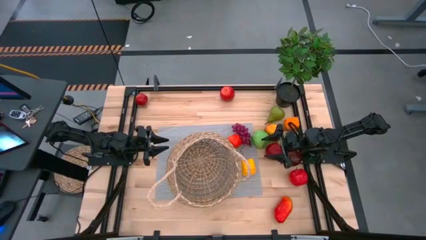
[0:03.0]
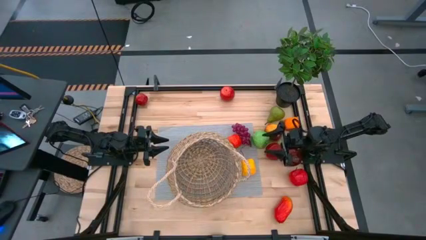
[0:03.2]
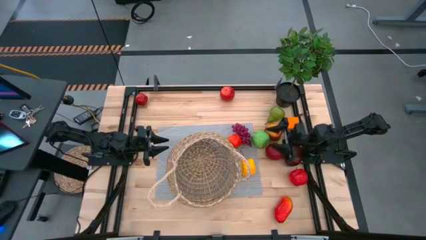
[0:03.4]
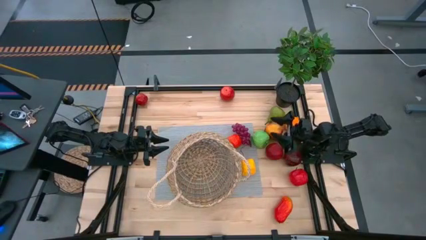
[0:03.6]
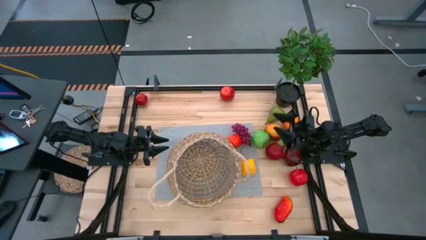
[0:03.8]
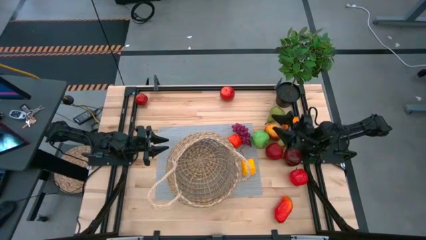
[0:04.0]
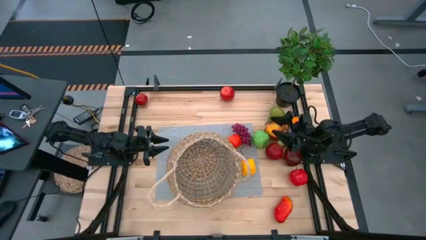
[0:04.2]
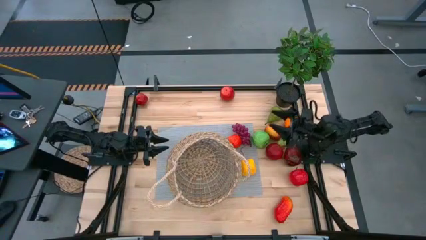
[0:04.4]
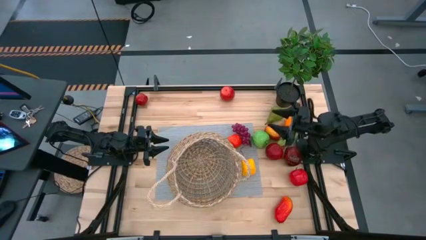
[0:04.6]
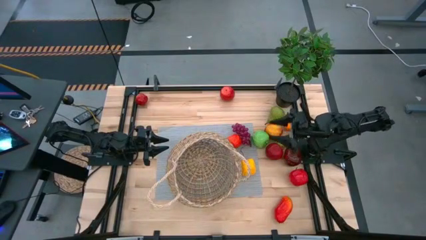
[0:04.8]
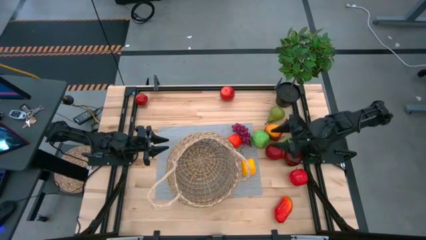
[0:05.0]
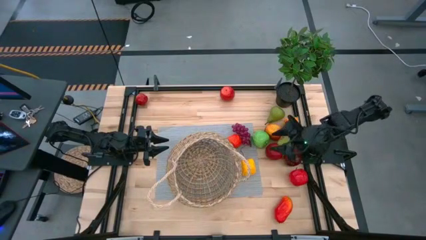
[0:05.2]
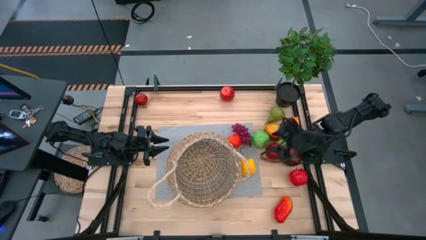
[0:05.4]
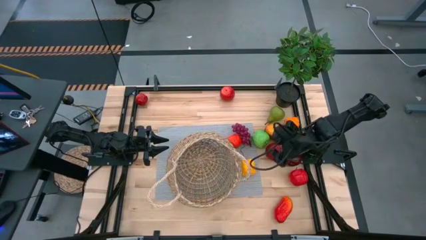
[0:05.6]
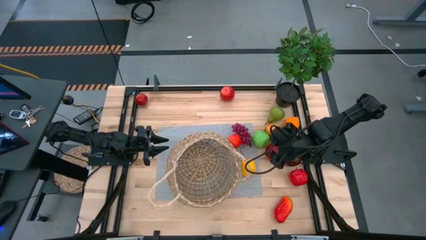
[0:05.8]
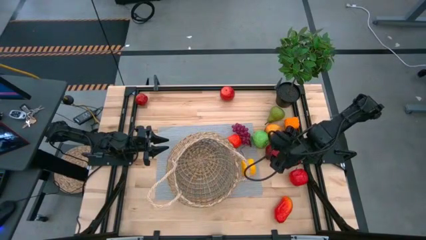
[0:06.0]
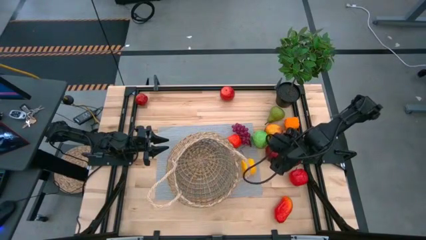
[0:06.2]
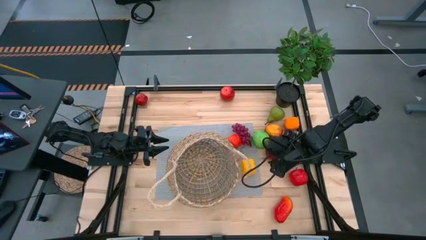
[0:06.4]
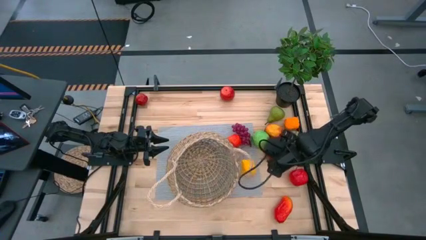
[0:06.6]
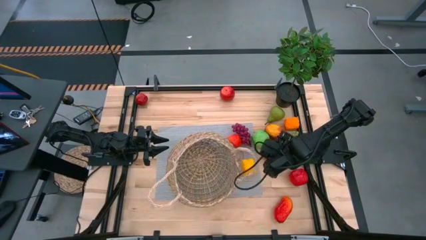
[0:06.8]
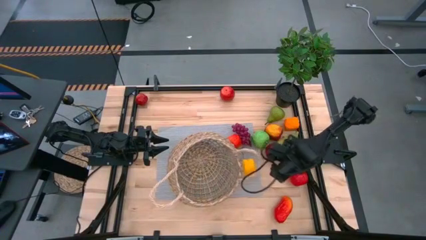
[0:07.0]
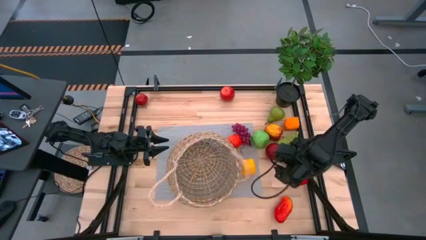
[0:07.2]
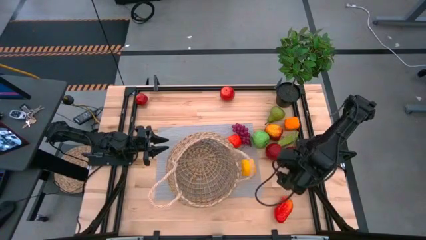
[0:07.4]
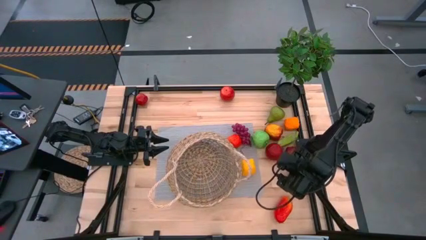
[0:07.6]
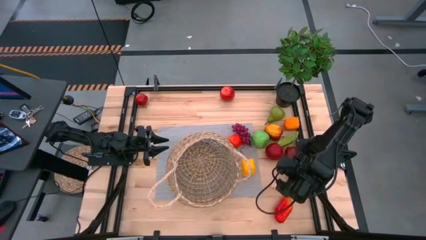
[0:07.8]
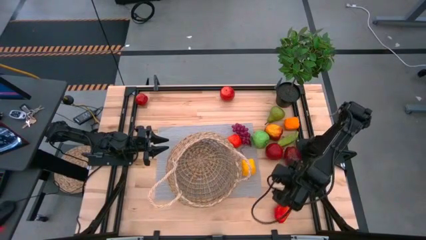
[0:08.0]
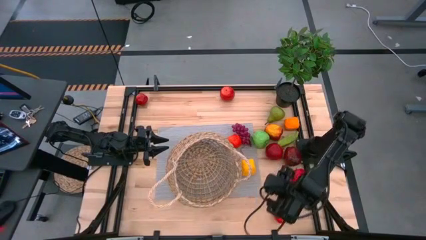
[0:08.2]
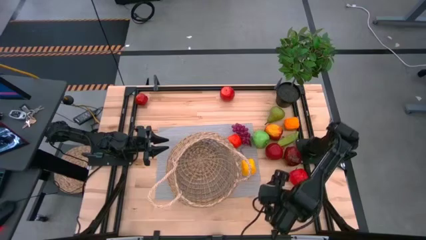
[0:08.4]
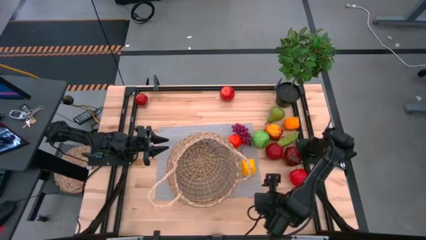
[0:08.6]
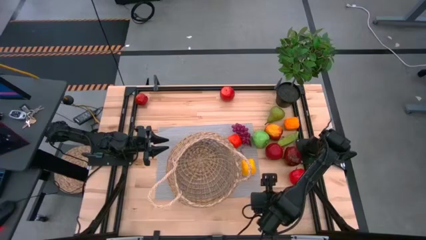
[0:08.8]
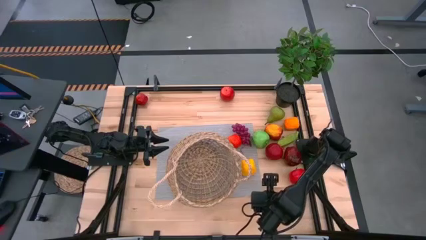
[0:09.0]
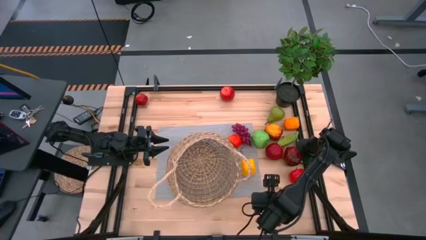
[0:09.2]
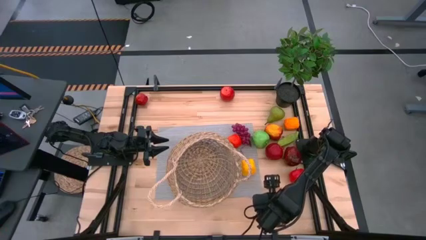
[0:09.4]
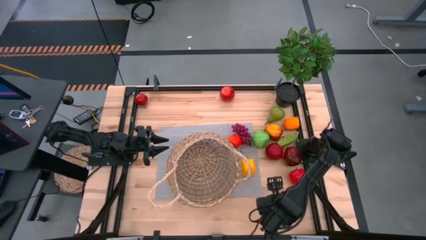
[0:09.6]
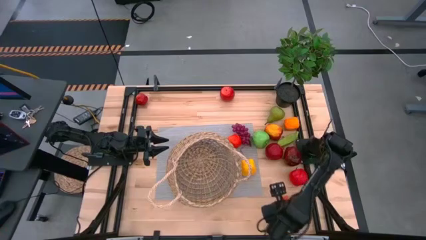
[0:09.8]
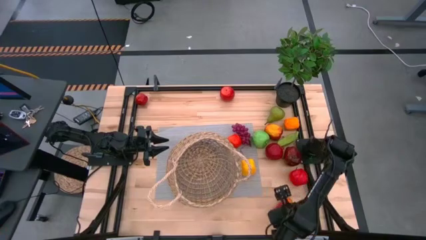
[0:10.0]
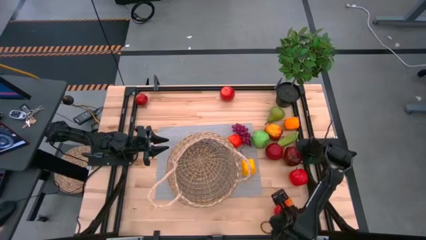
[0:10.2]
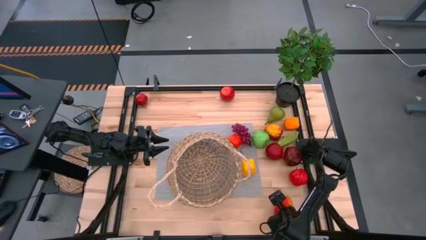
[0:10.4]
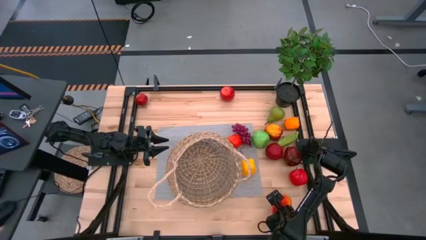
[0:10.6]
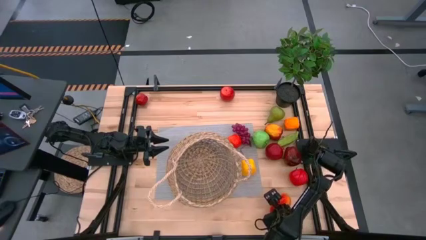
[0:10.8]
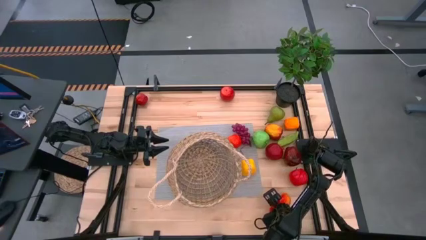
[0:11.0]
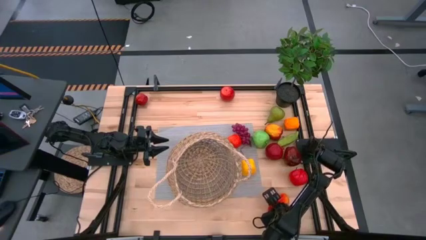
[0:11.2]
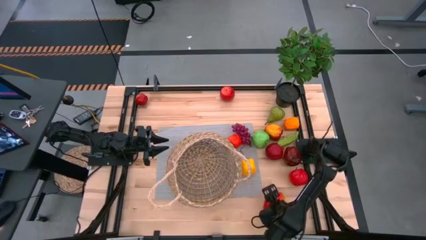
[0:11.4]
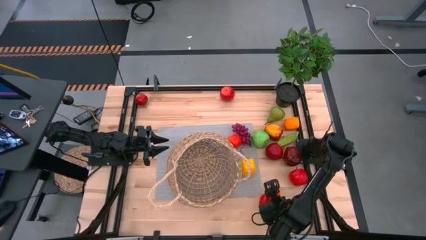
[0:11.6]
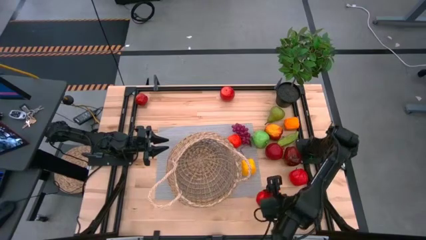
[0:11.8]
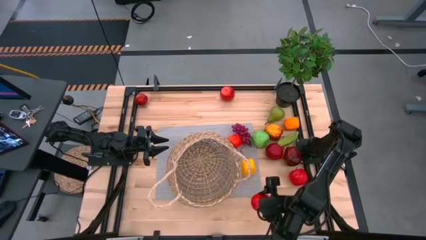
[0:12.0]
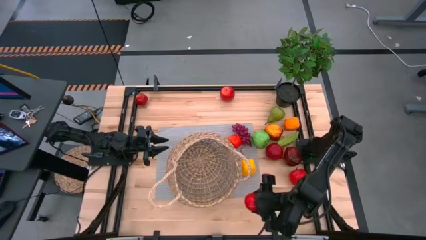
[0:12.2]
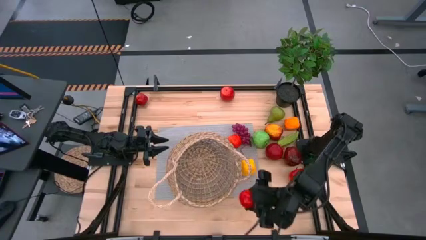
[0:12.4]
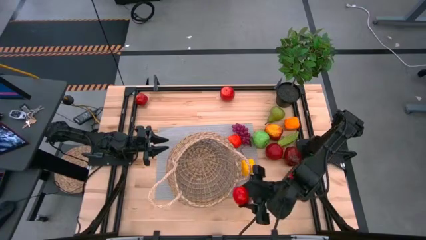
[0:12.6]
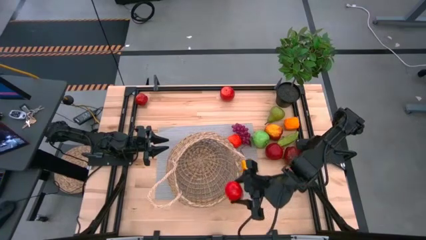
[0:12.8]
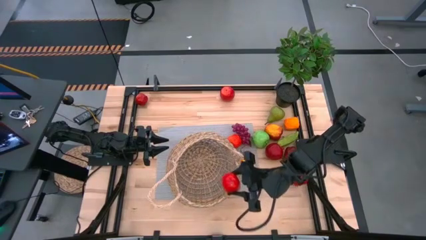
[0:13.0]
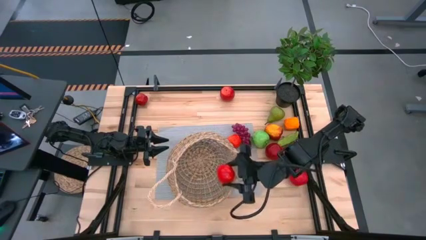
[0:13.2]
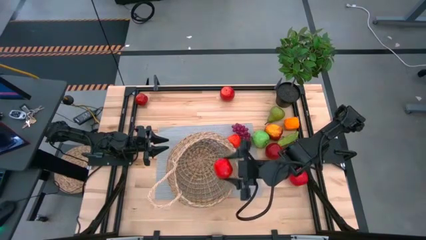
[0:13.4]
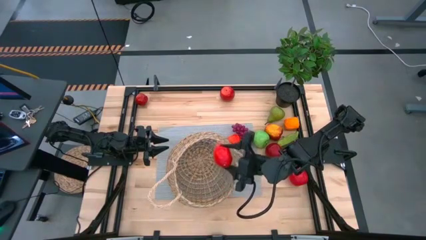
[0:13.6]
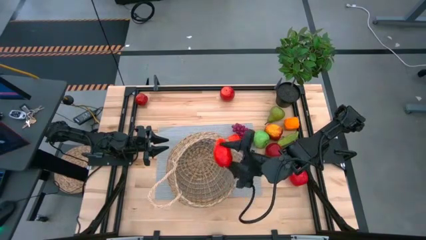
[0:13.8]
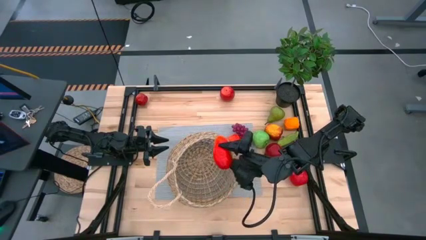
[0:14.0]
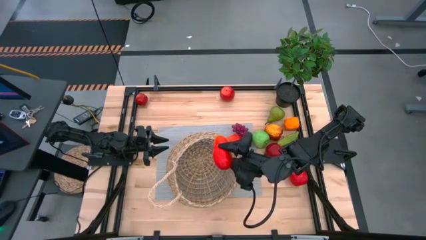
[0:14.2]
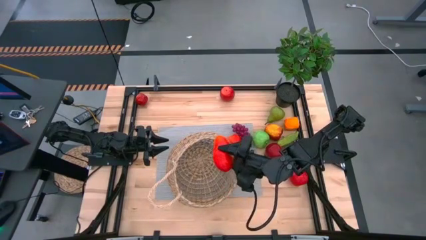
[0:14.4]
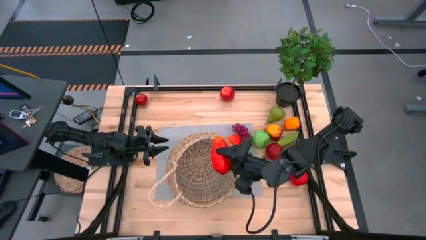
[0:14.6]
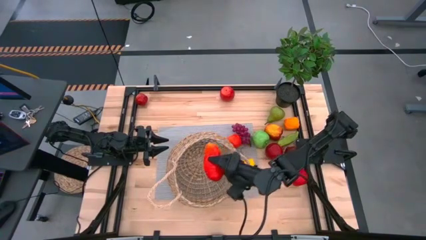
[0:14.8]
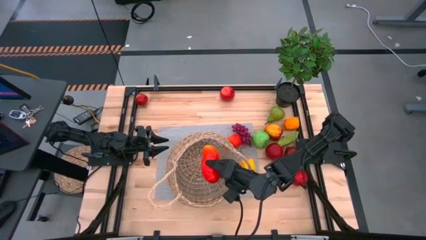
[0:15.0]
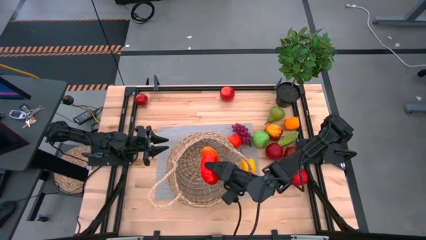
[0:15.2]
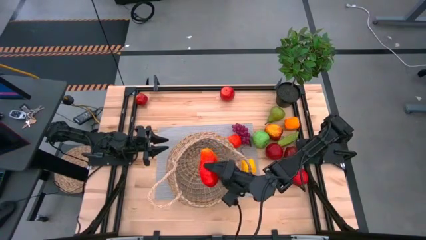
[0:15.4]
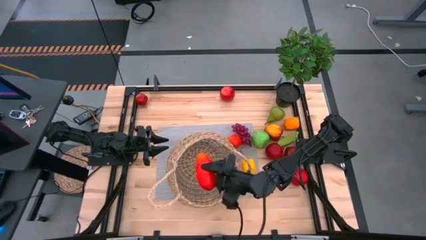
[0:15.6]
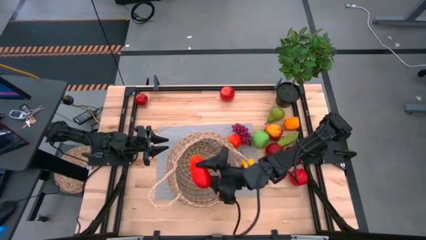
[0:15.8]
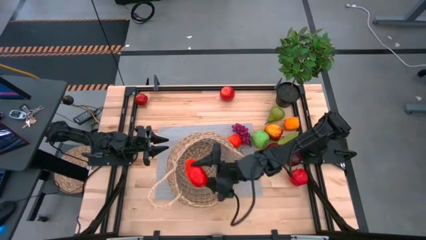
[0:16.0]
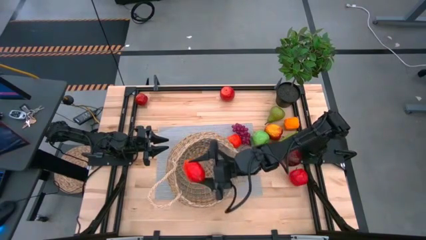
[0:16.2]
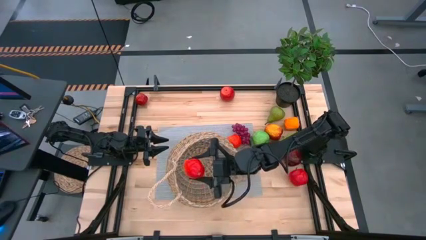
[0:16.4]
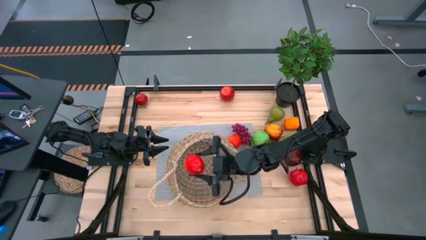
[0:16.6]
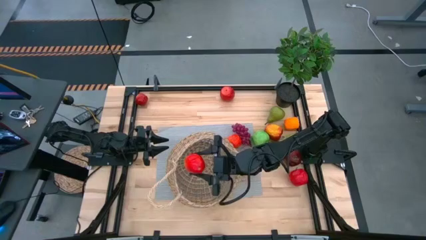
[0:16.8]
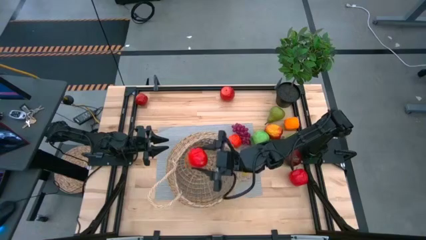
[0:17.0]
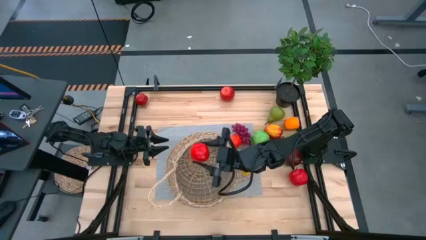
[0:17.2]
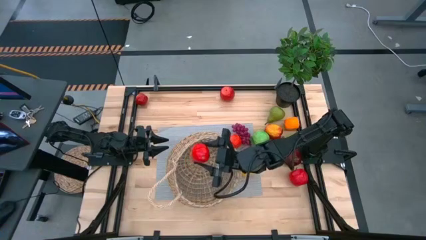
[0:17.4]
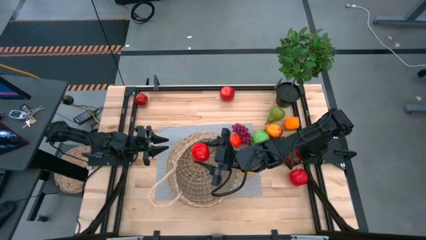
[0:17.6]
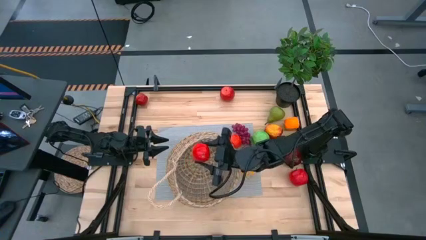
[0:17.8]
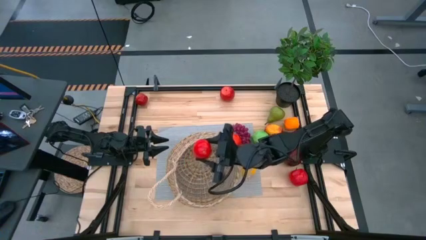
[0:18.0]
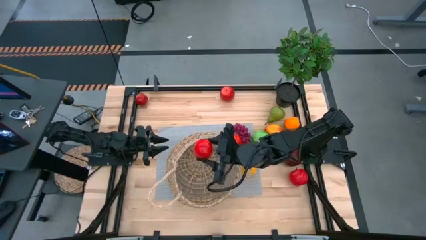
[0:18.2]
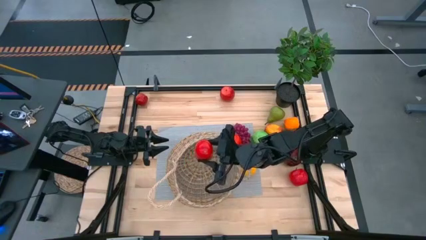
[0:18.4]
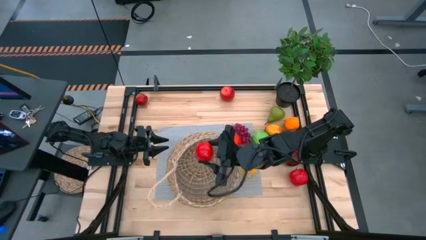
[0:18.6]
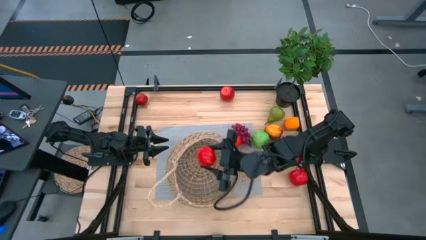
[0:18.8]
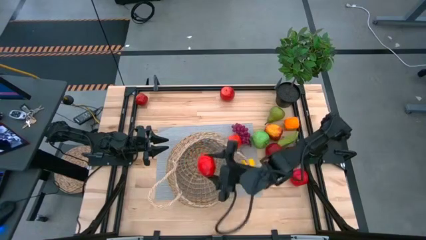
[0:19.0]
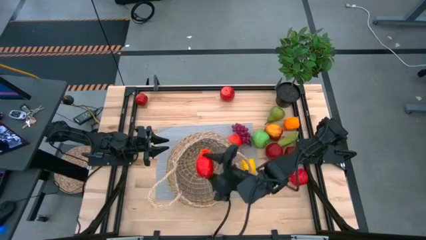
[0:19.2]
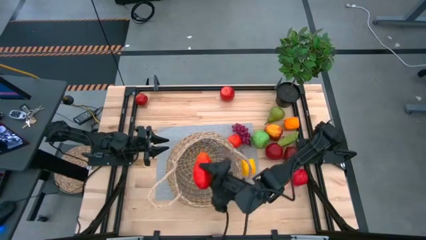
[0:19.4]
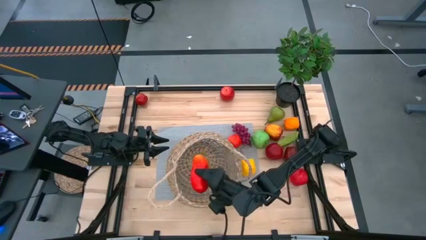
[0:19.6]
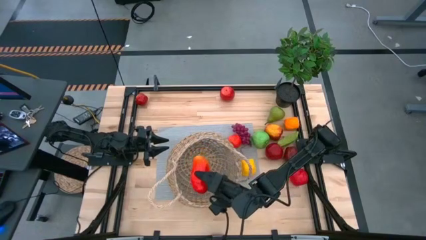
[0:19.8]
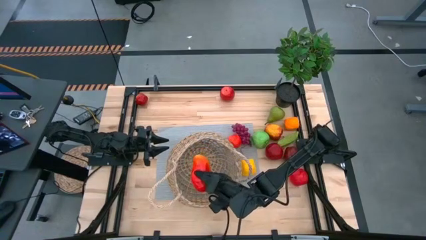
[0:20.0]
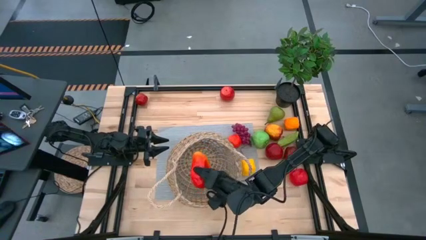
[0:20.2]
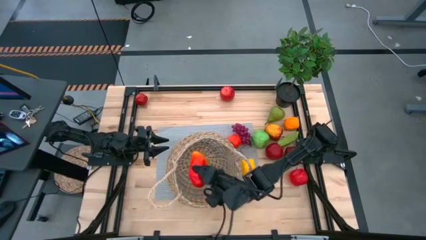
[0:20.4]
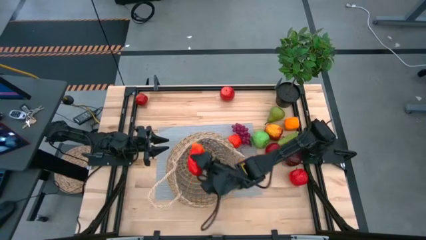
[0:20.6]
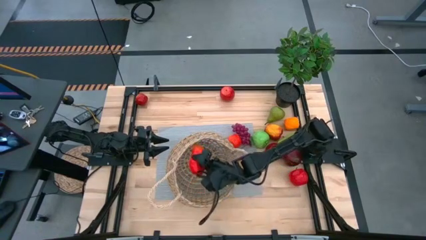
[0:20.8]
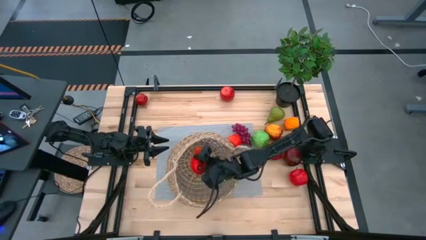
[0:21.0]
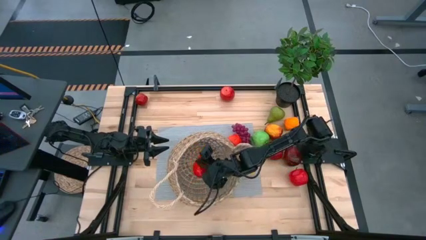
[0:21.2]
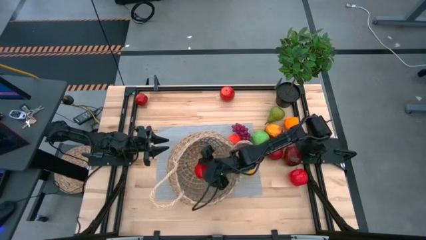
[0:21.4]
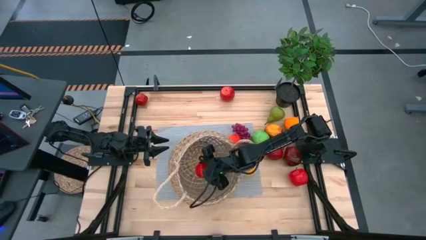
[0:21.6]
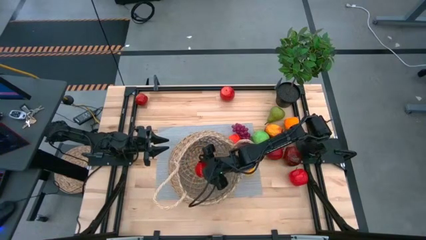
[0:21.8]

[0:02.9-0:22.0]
Task: Build produce basket
Put the red mango into the brown basket
